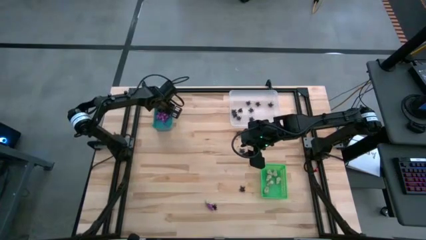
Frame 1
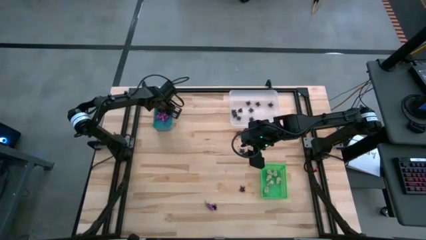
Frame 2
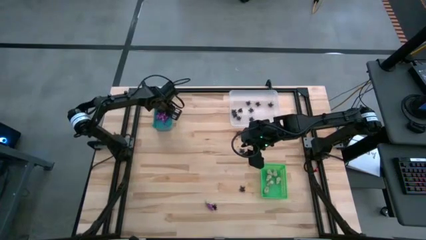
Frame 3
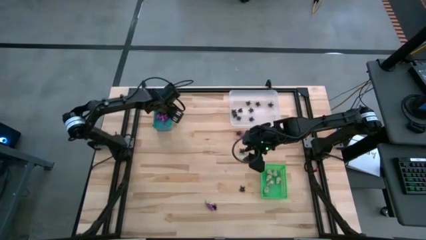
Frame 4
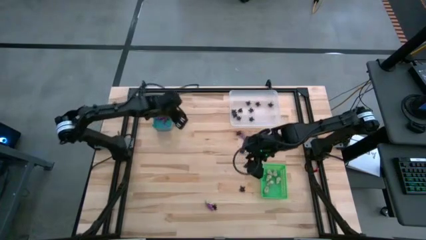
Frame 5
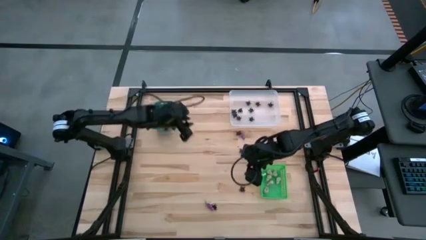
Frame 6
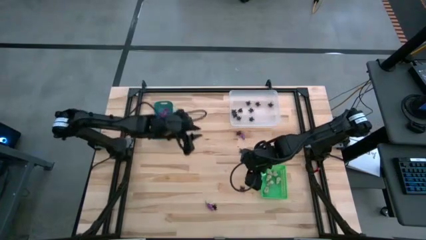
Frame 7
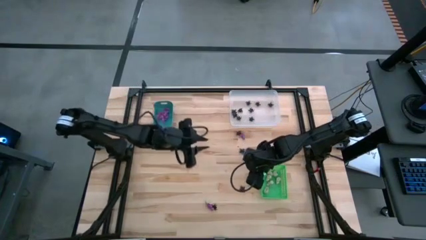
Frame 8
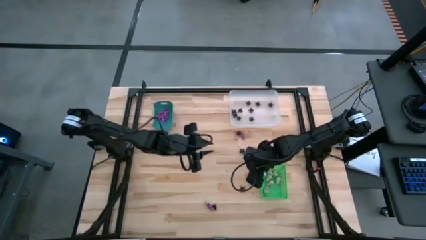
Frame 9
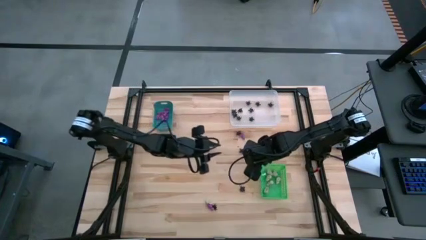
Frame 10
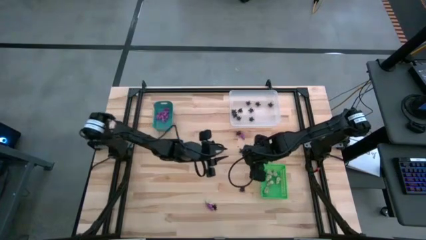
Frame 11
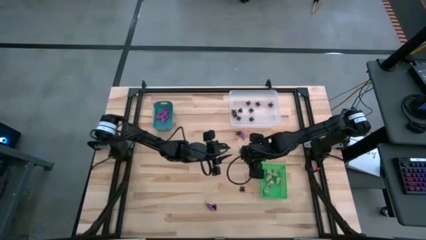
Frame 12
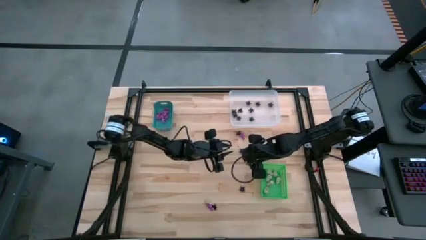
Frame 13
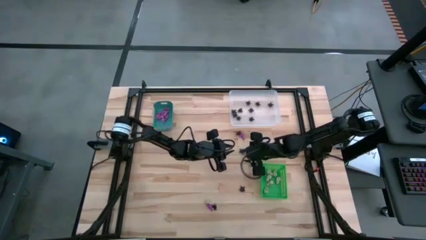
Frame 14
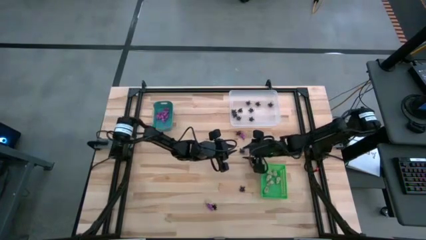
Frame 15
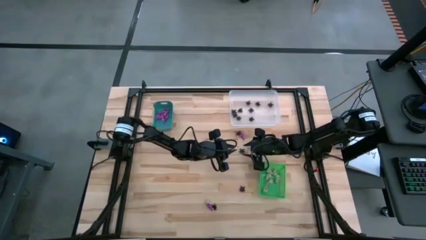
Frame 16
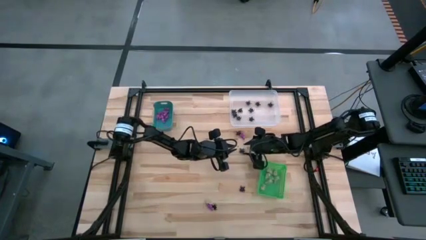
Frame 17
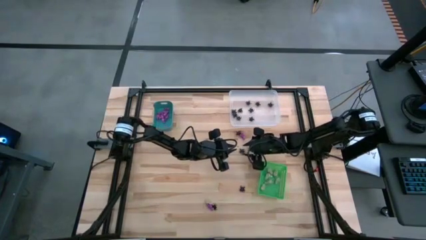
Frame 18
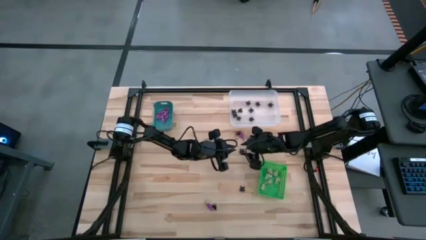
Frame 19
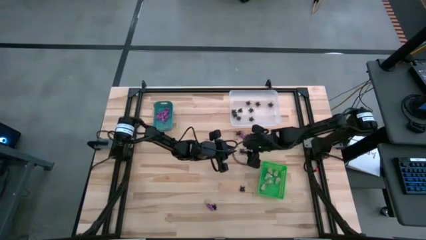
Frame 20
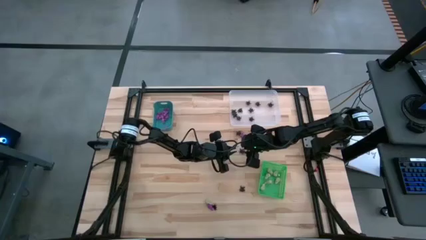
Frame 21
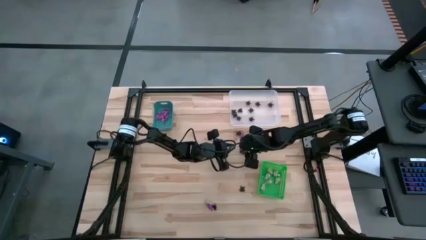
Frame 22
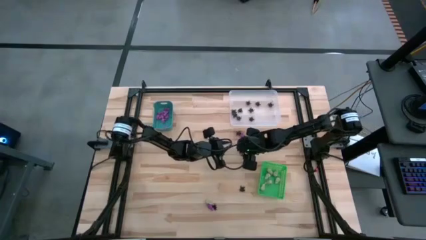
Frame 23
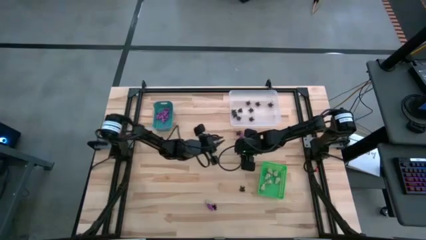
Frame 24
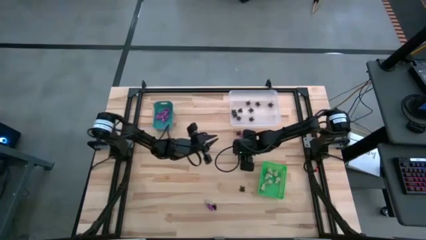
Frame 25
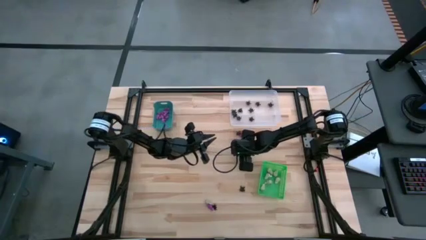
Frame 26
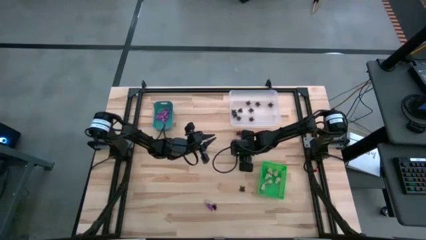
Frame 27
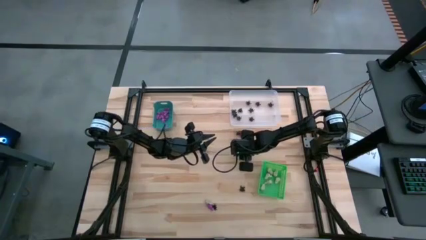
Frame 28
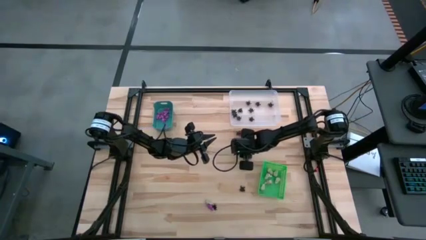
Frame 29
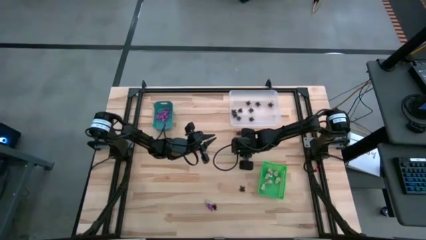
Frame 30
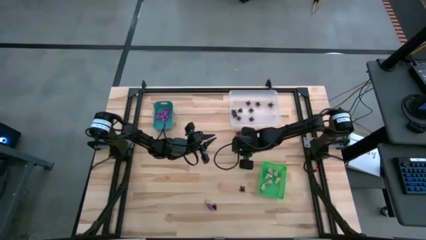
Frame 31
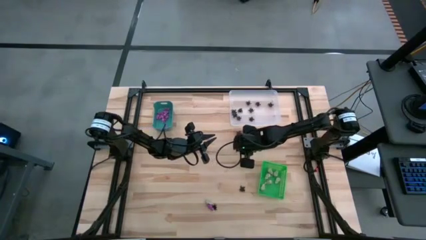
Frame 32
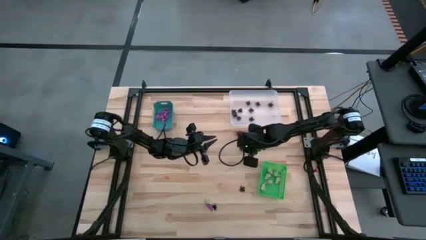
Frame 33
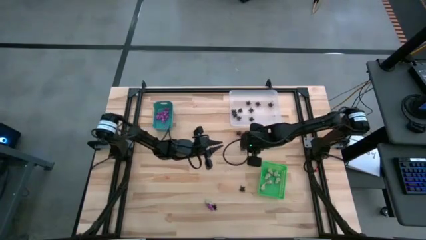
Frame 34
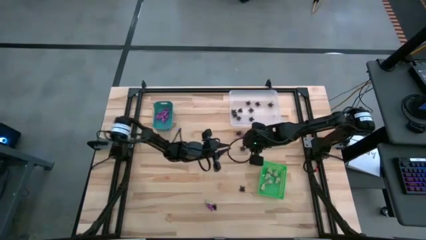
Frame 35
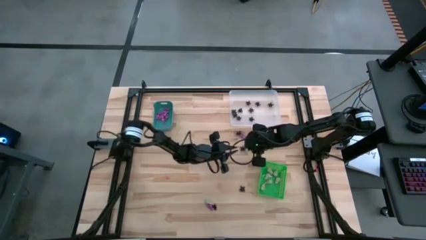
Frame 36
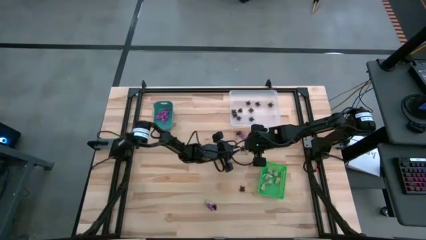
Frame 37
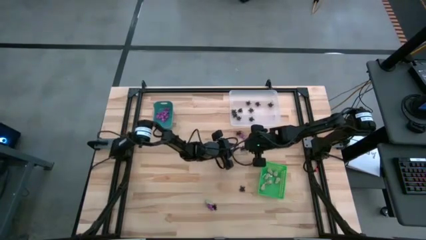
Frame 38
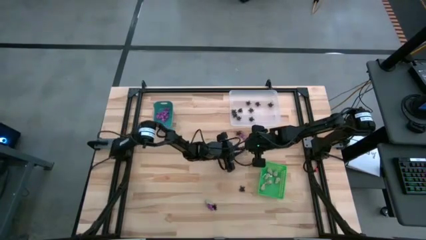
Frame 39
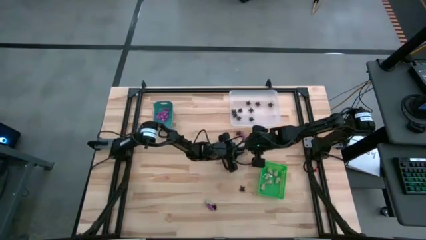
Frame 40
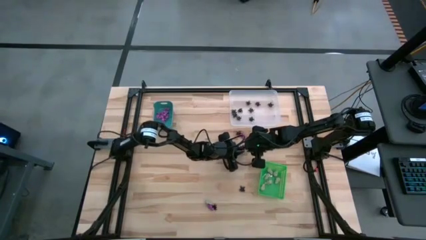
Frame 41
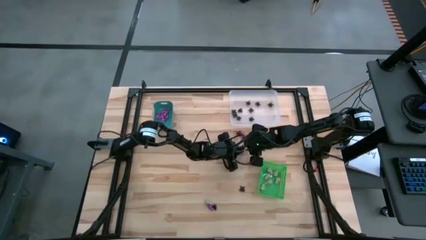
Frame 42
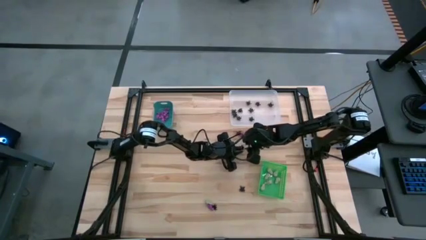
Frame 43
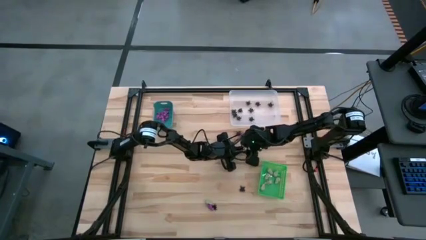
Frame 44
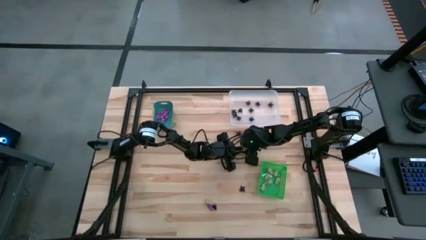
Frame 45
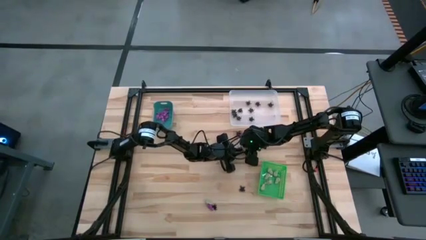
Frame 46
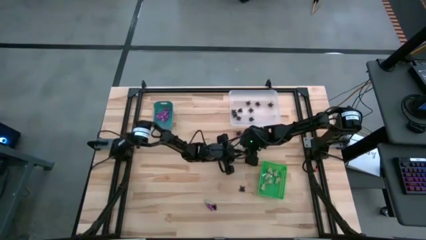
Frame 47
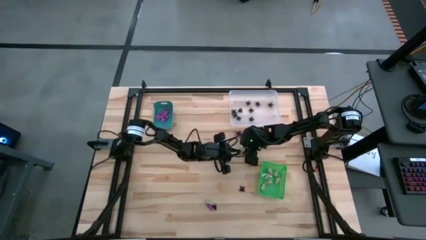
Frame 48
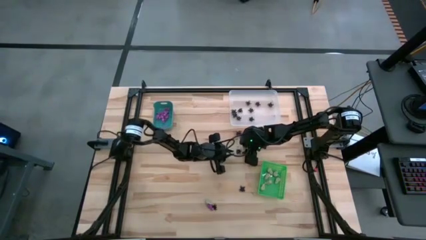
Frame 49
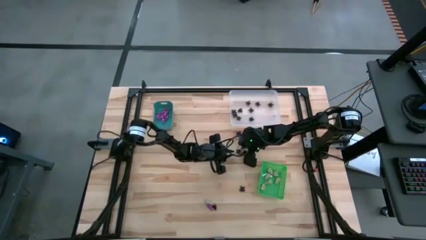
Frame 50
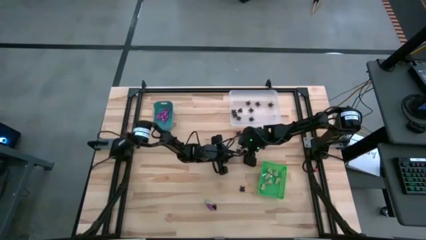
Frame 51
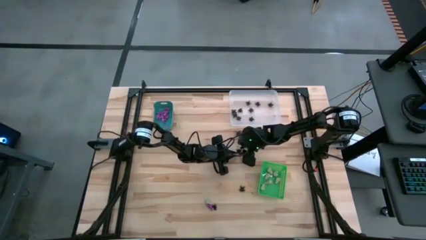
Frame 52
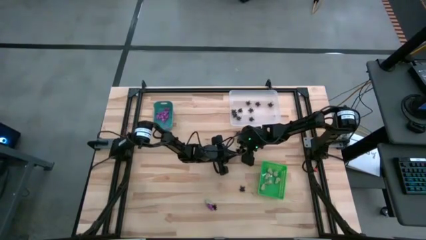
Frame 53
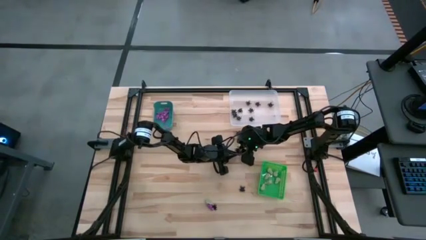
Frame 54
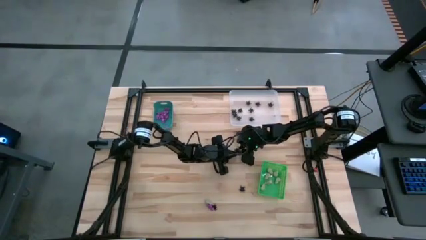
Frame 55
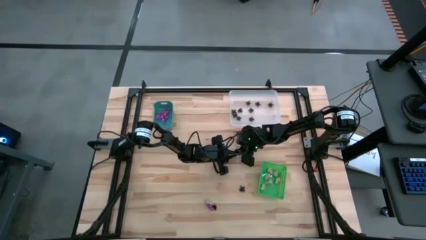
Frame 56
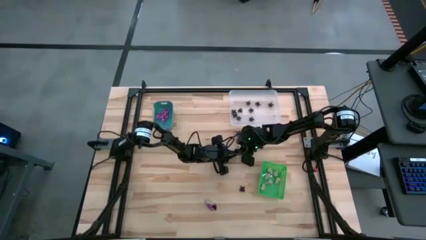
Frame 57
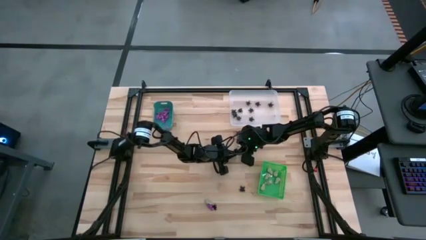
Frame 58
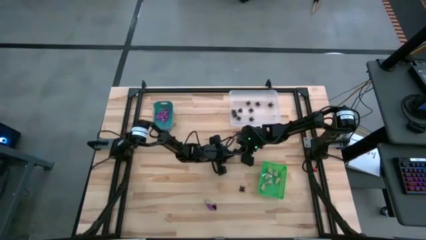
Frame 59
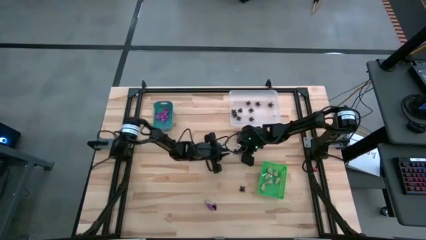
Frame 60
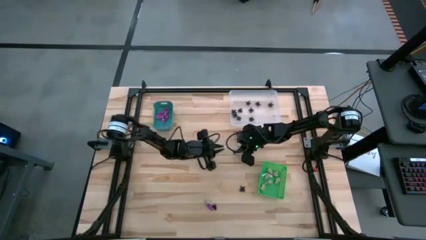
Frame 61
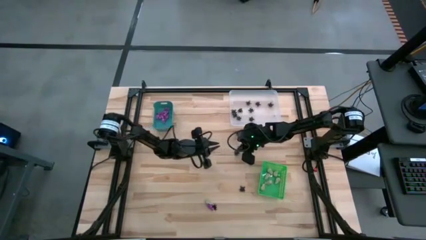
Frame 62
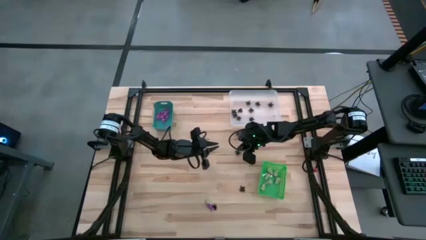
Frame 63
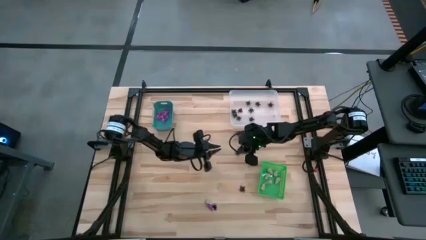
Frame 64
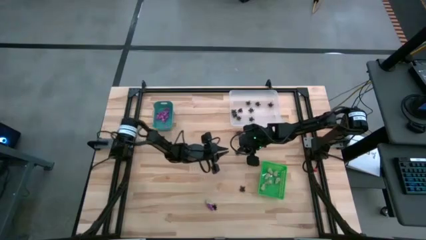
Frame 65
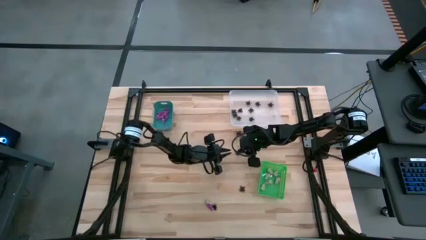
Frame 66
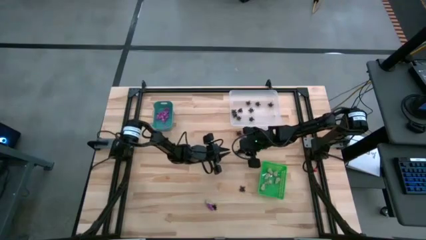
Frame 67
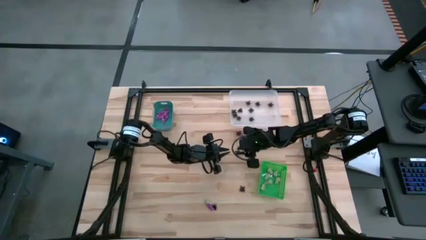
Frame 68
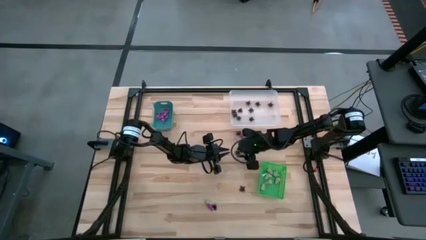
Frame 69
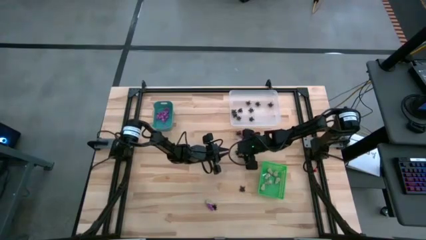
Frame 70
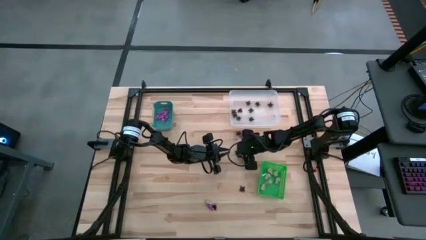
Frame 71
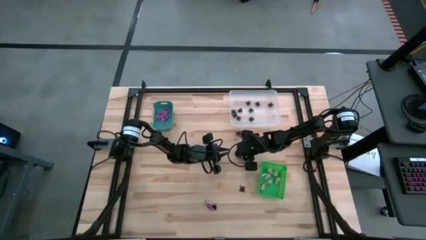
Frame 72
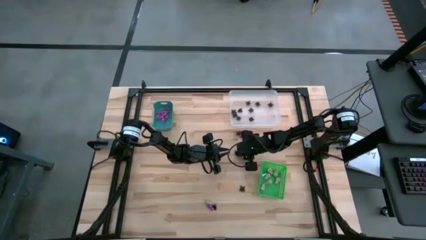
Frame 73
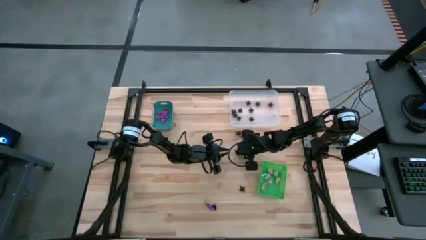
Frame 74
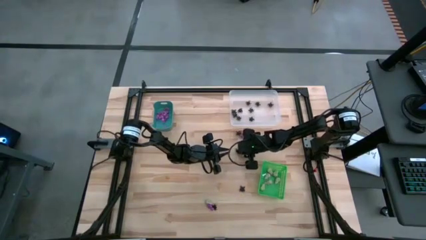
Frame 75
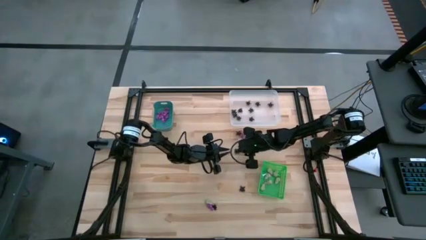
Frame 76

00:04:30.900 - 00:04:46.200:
Task: Sort Halloween decoration
Put the black spider toy into the white bin
